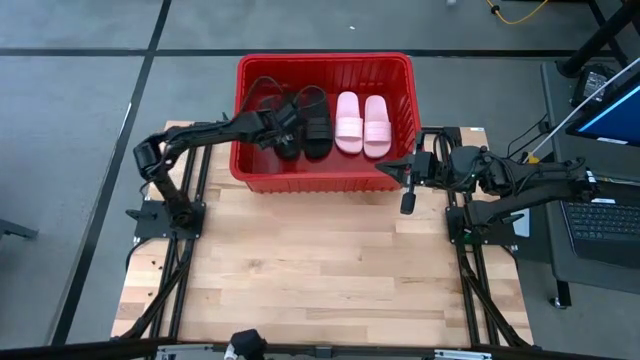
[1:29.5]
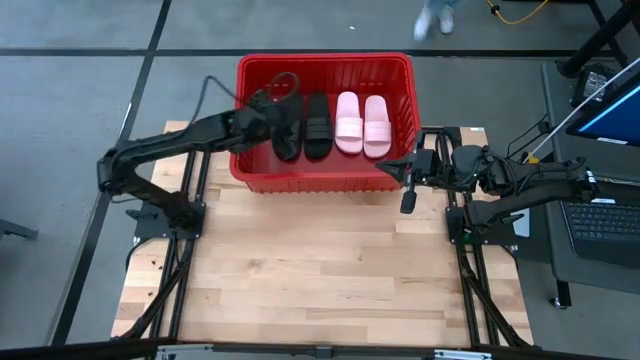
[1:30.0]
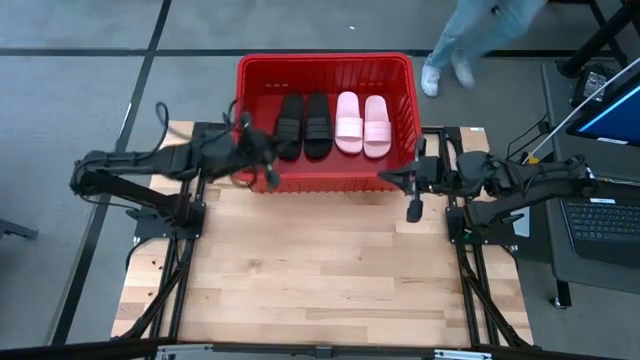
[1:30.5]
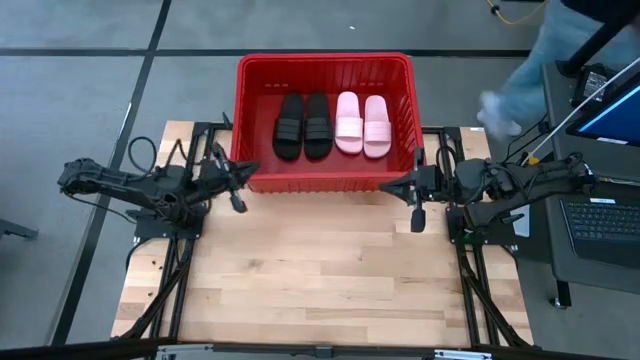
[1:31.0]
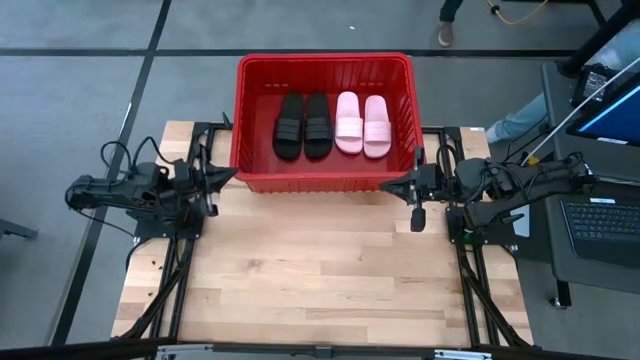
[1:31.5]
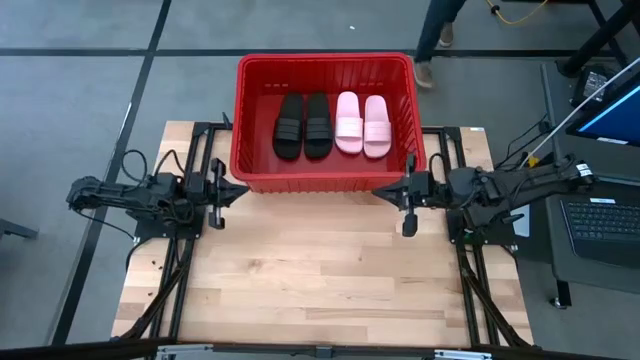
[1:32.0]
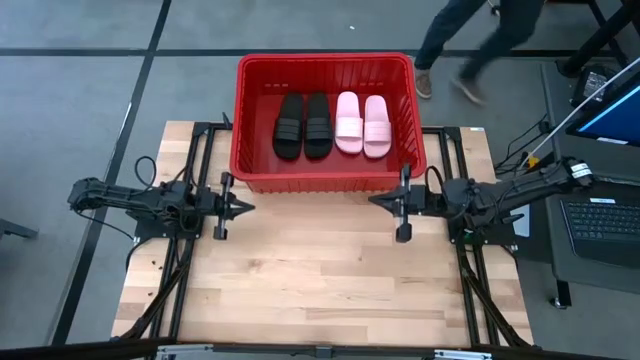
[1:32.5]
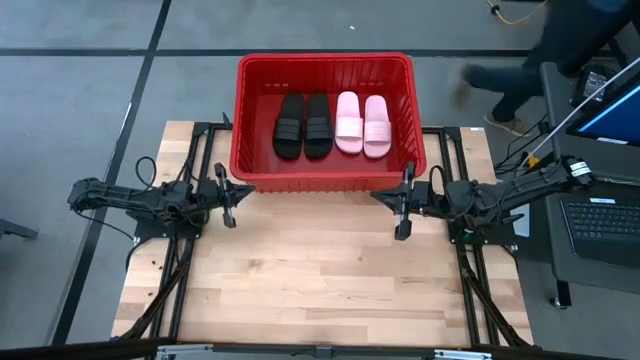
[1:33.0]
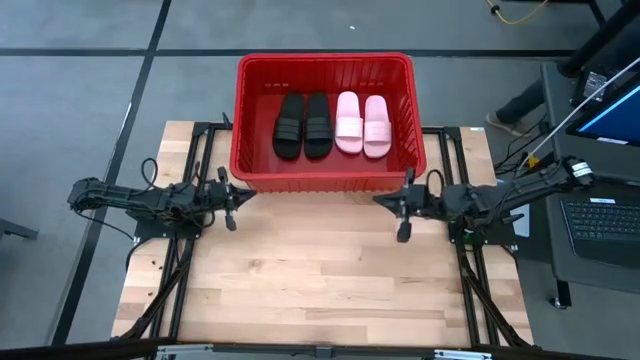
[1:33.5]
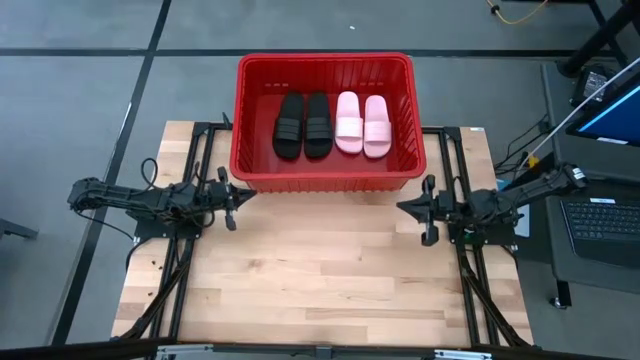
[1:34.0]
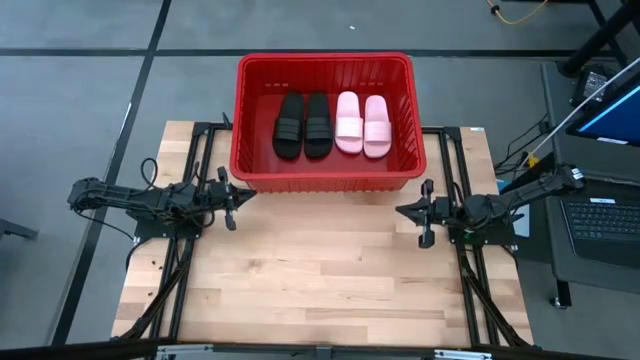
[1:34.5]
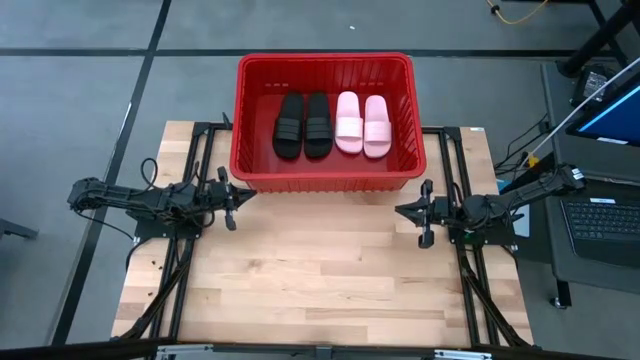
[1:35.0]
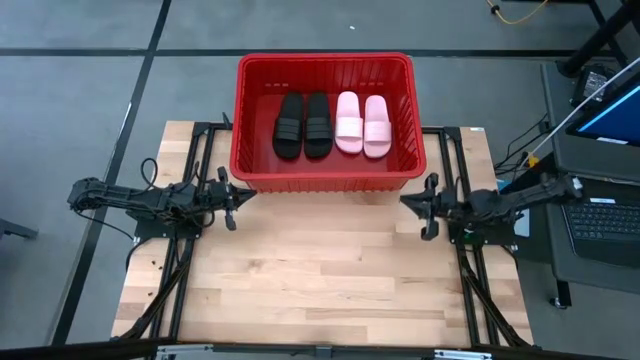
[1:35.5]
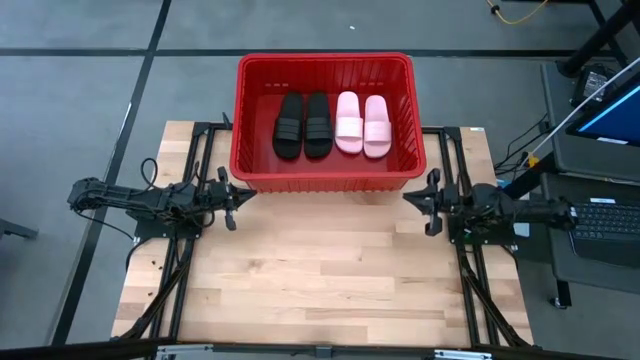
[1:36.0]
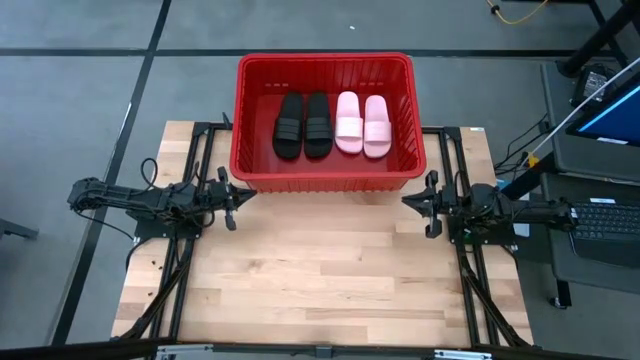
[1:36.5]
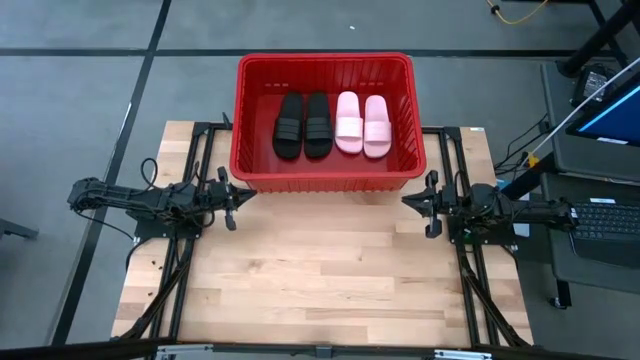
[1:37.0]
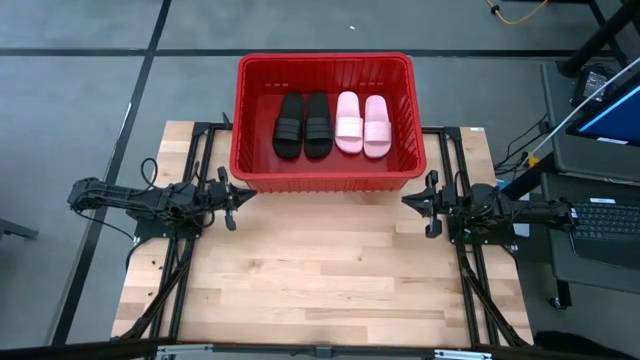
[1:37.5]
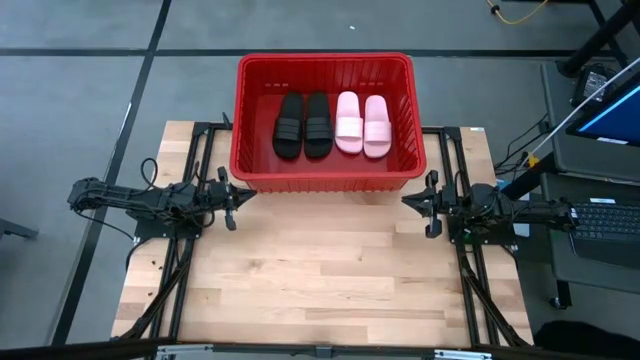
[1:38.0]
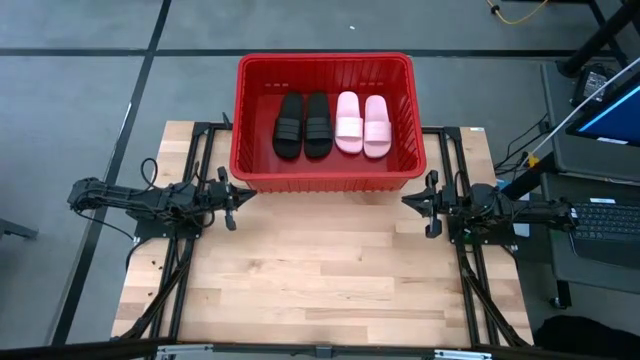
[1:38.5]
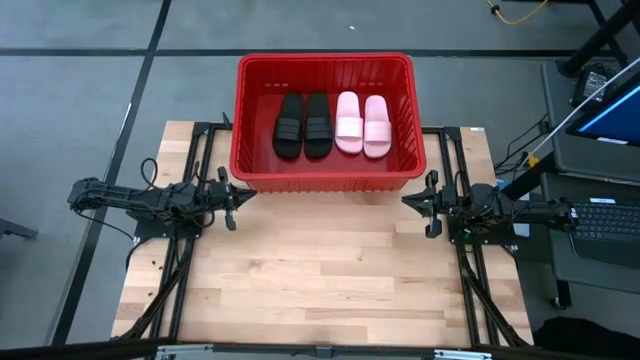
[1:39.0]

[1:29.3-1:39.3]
Task: Pick and place slides into bin
Return to Home Position

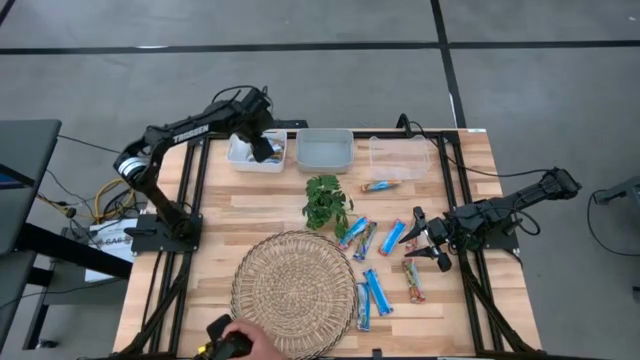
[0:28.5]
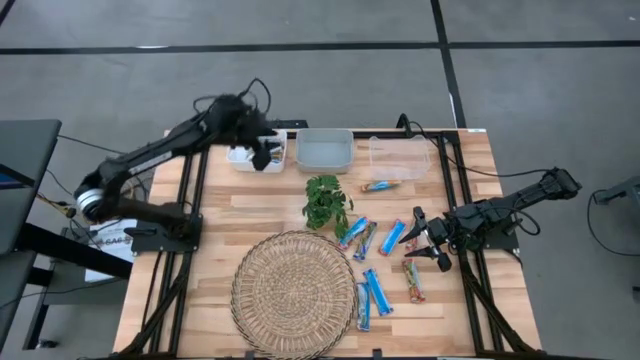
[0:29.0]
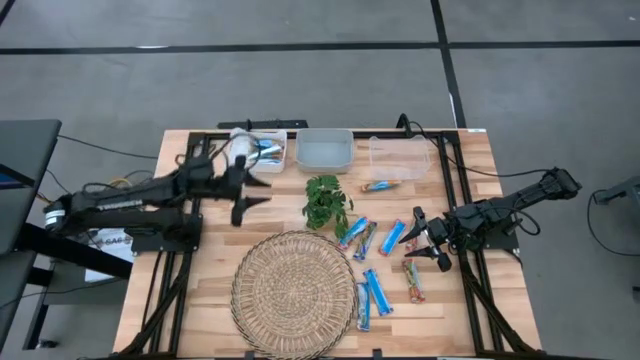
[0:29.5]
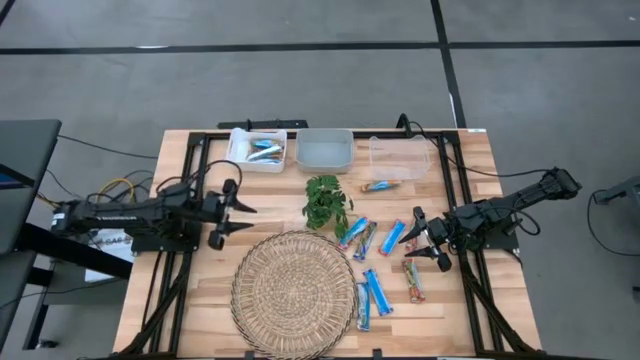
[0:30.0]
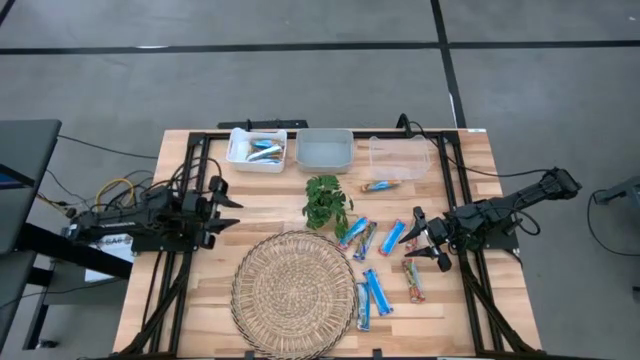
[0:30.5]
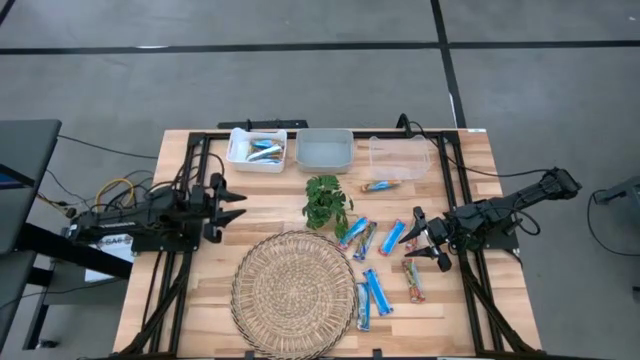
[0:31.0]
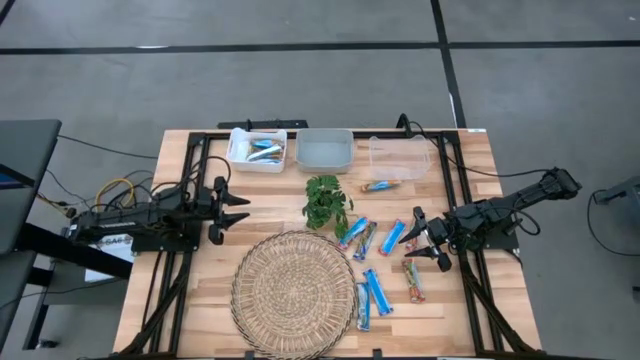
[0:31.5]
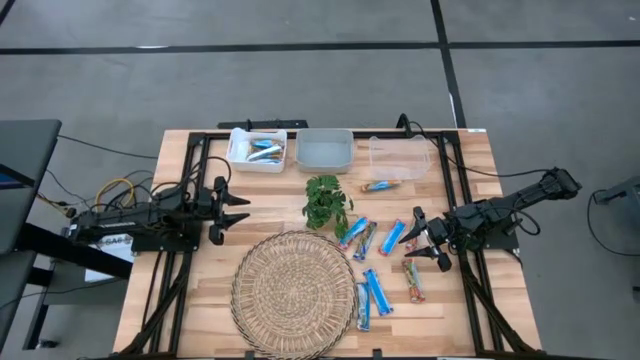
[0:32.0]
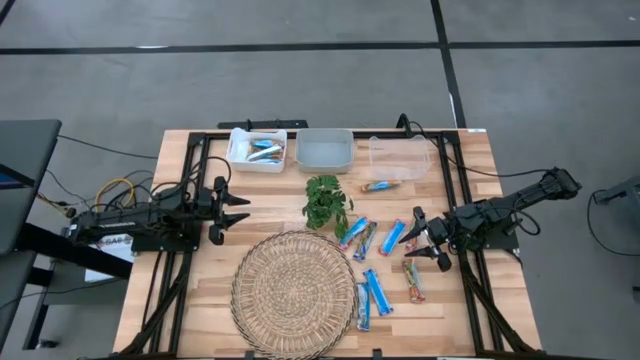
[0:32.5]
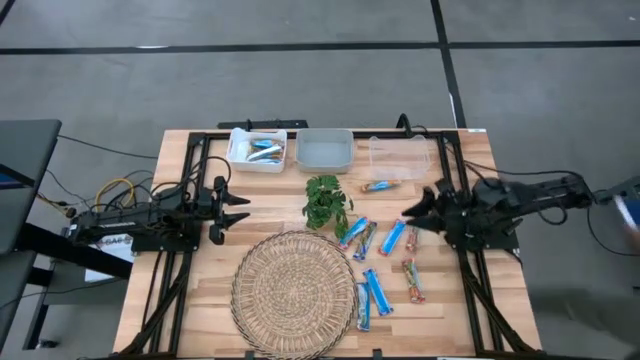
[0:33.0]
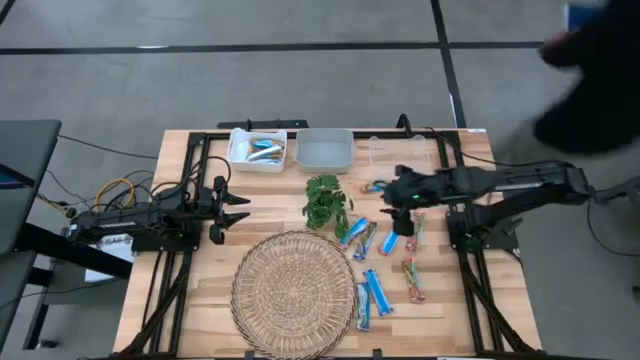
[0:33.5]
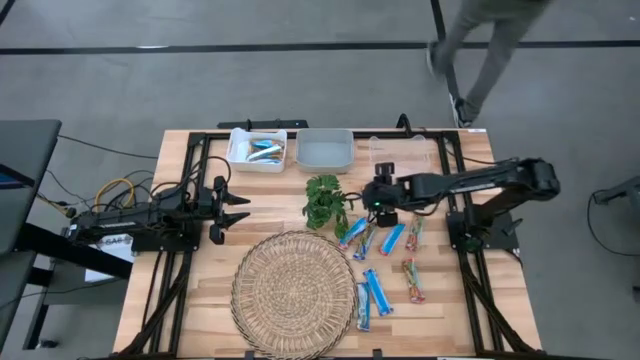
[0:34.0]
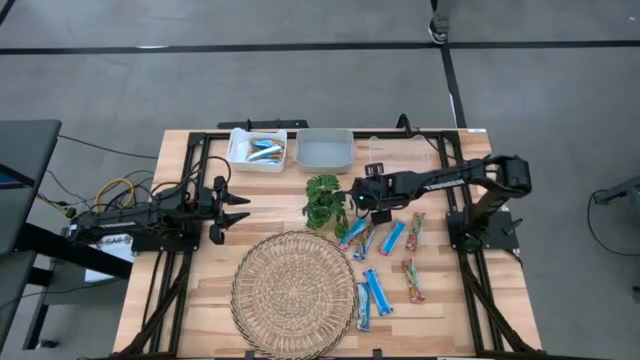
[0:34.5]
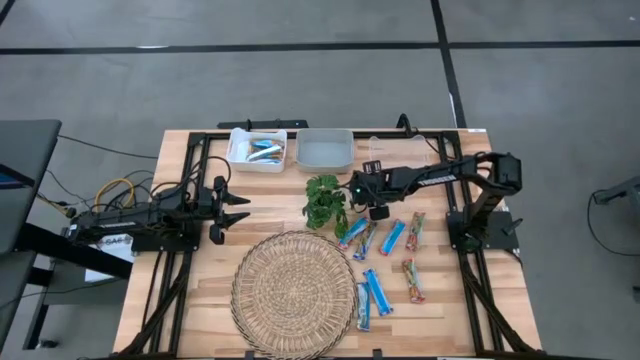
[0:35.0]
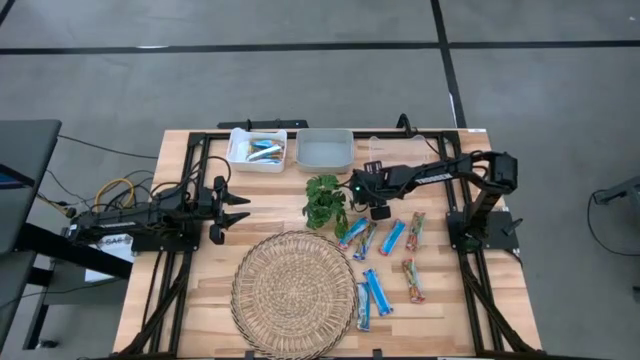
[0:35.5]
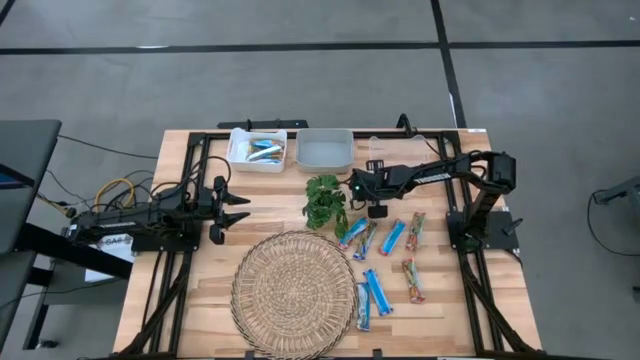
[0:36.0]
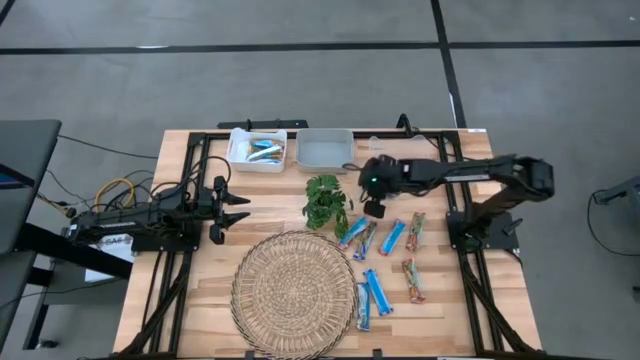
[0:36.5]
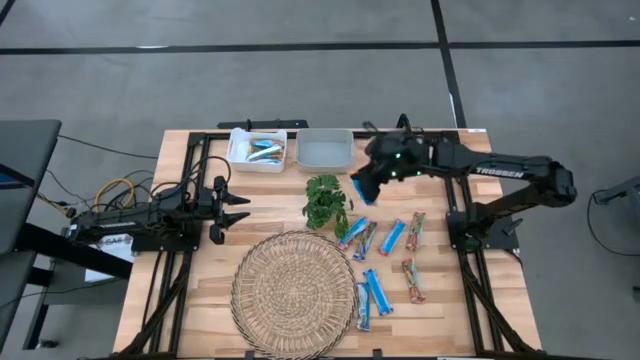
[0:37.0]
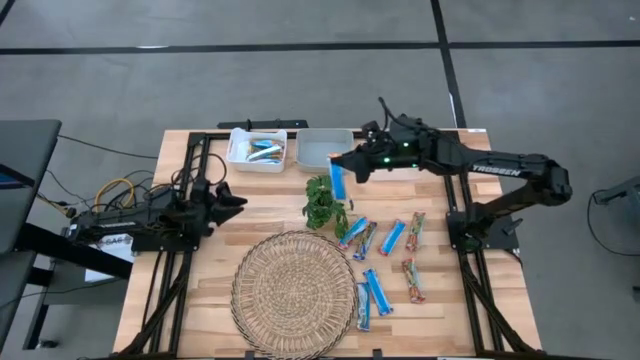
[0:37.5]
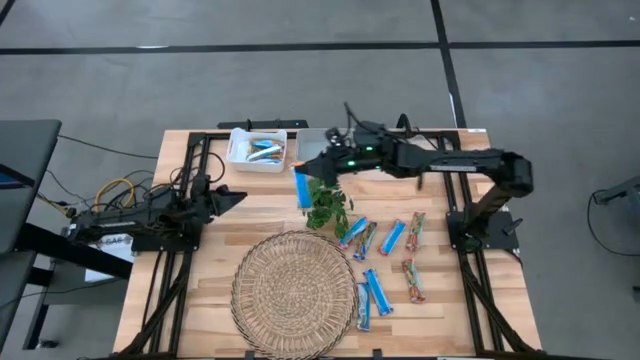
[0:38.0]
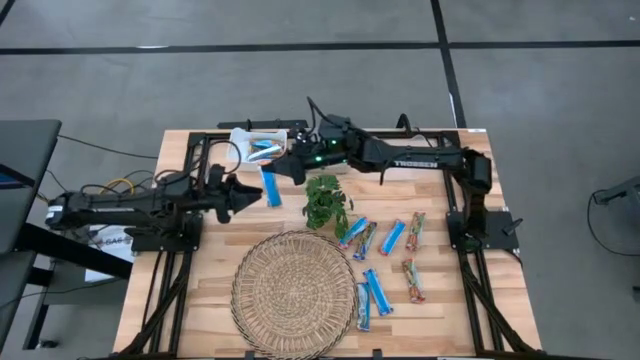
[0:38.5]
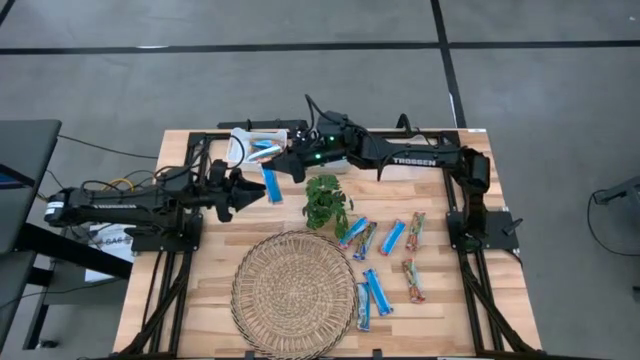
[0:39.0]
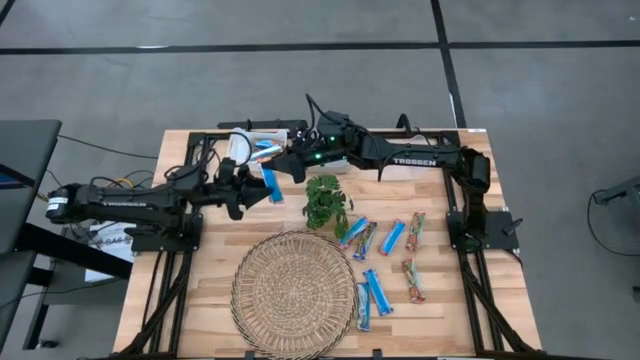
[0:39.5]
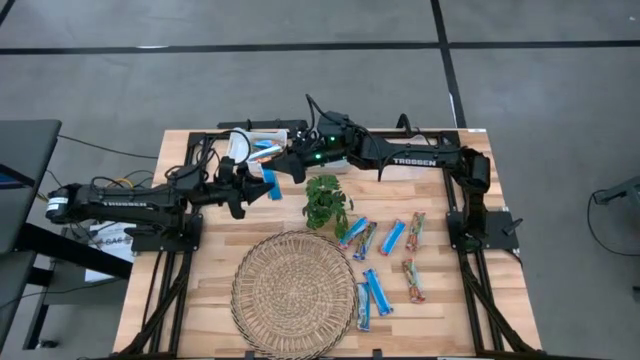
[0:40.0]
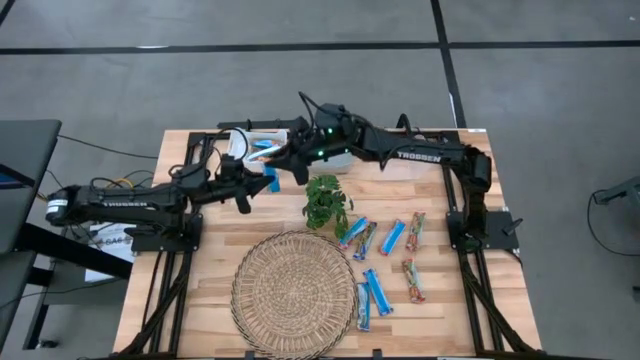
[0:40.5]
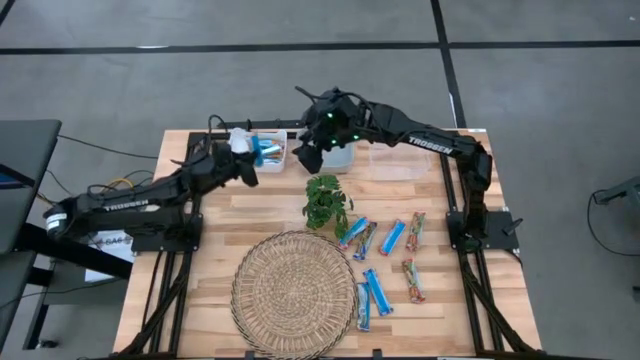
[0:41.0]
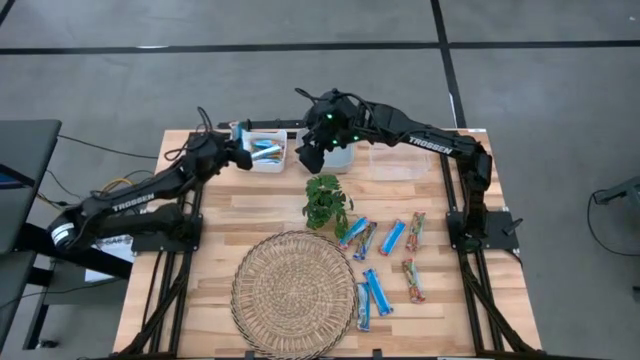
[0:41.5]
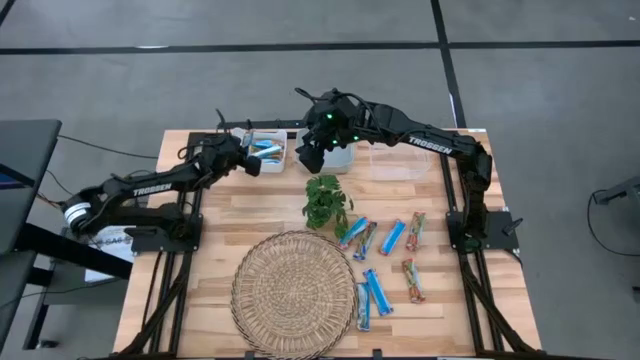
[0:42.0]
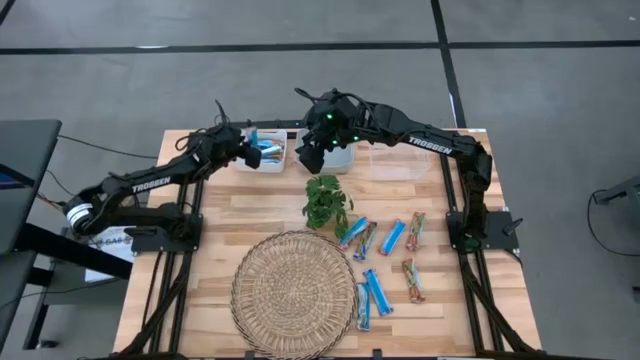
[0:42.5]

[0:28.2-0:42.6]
Task: Pick and place Granola Bars by type
Put the yellow granola bar into the white bin
